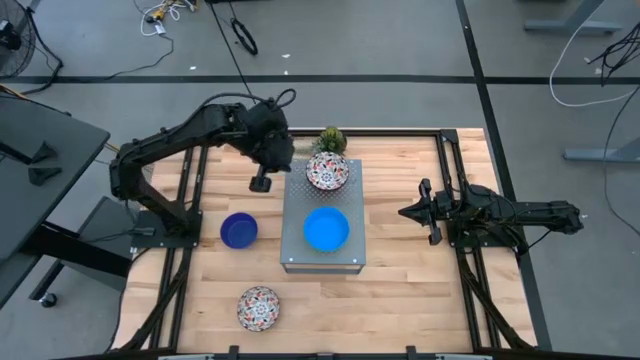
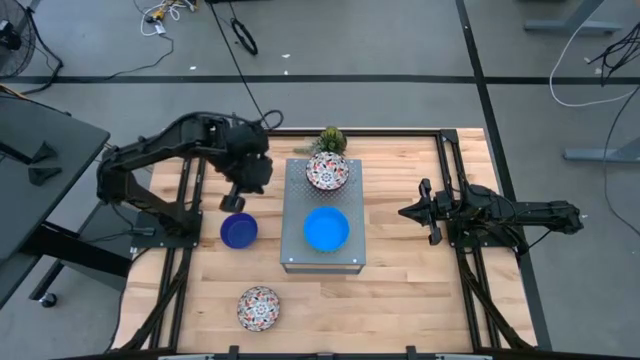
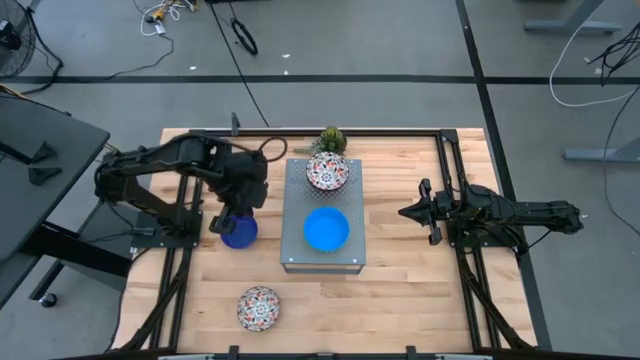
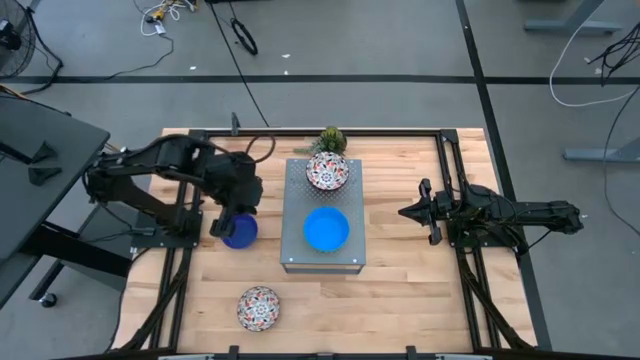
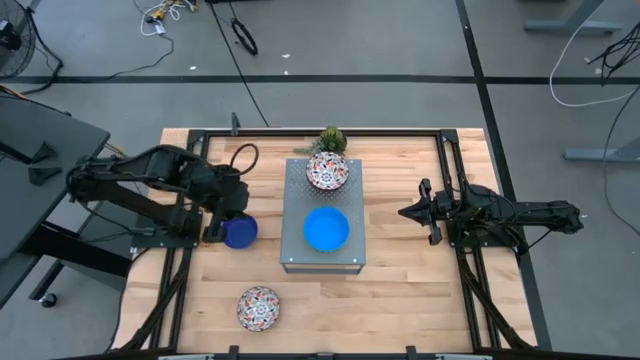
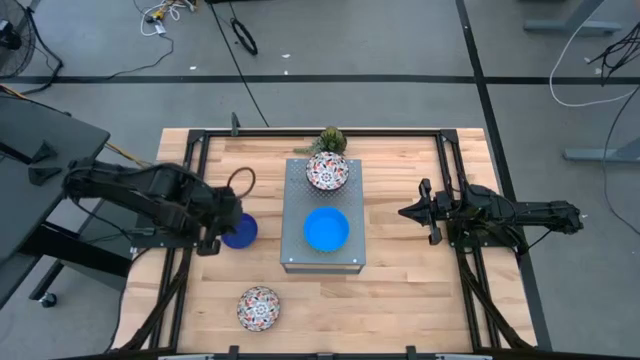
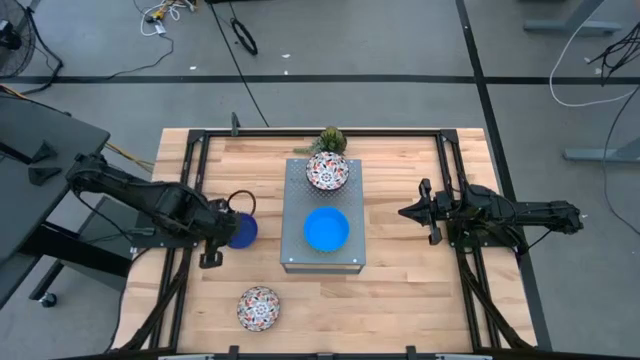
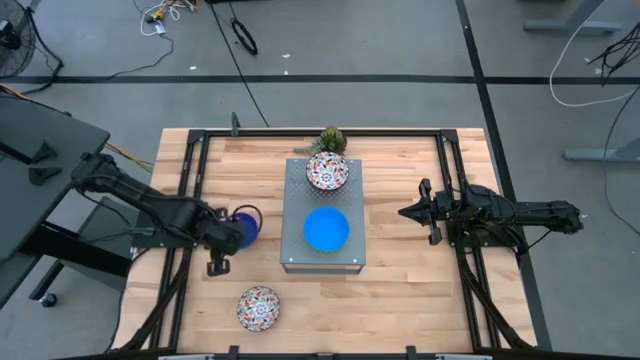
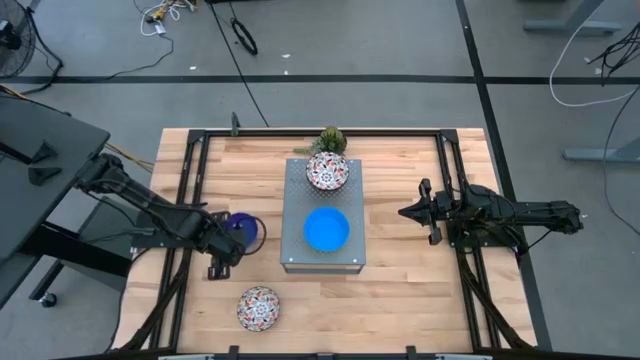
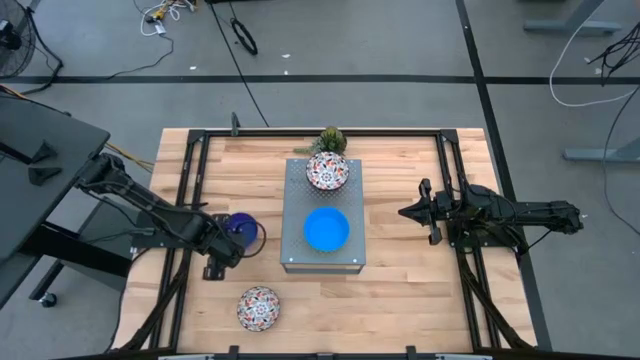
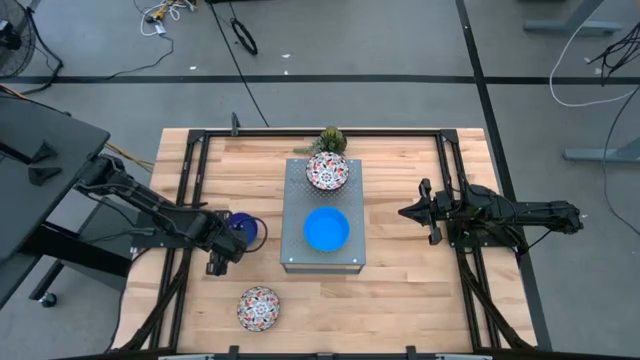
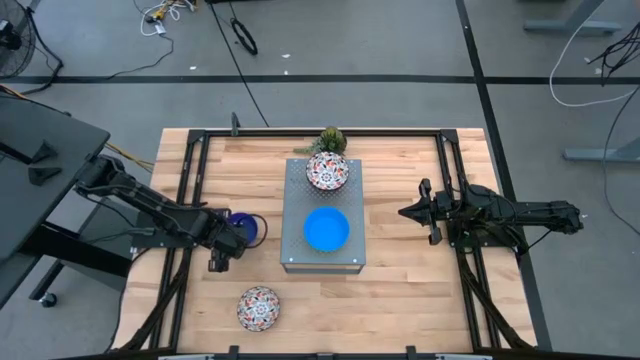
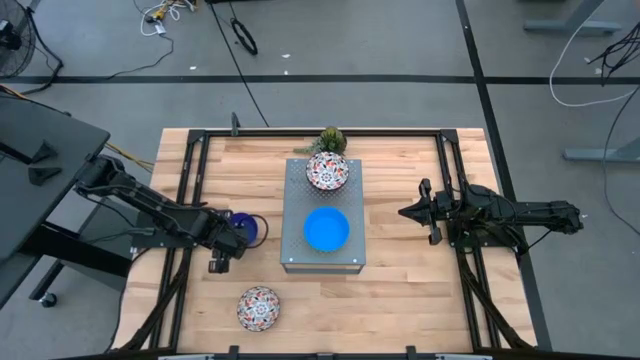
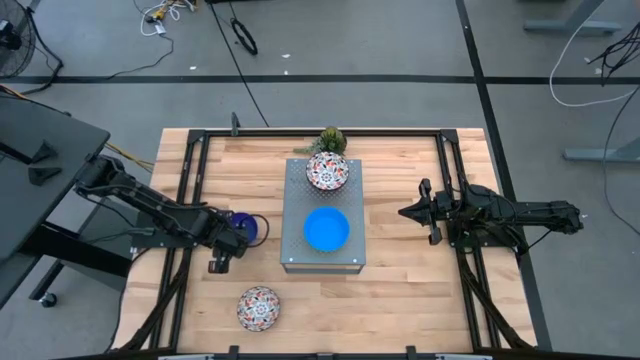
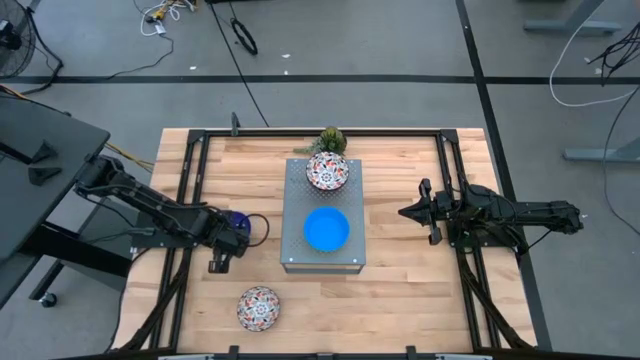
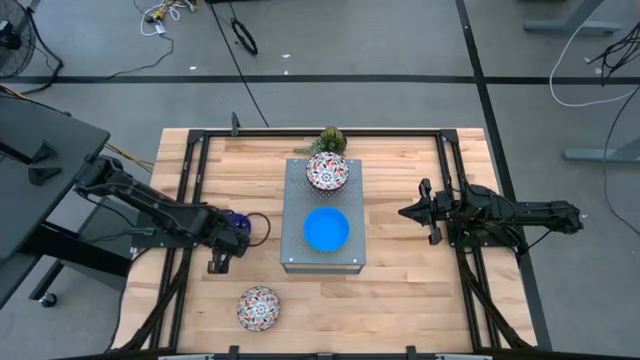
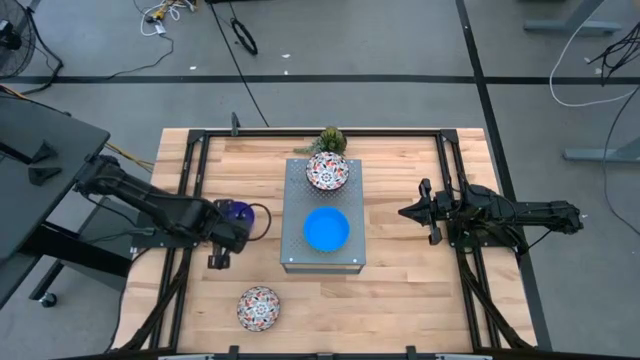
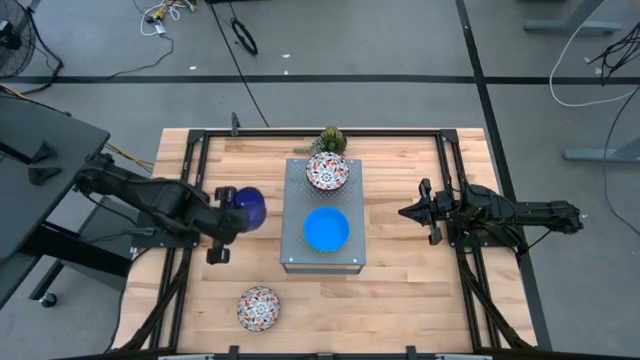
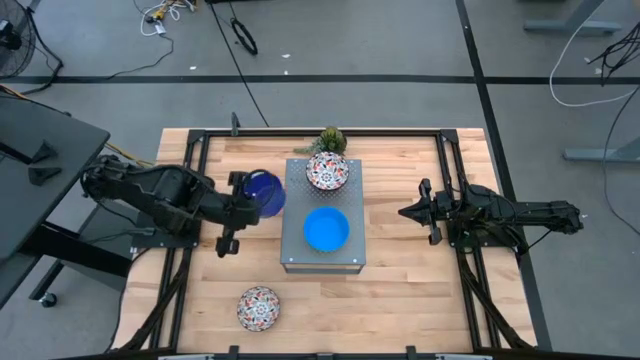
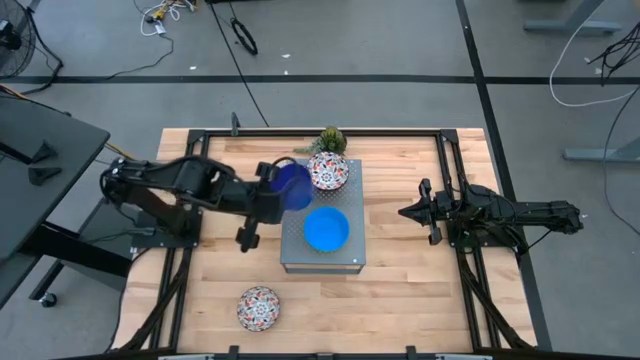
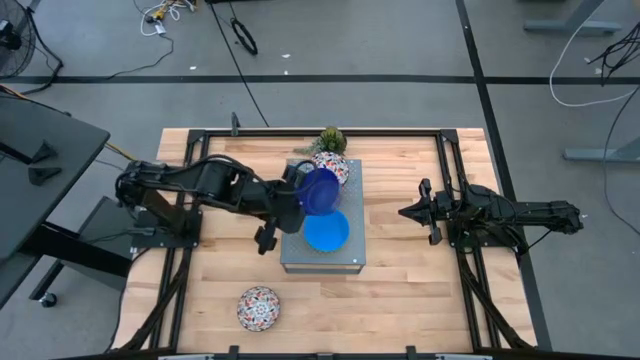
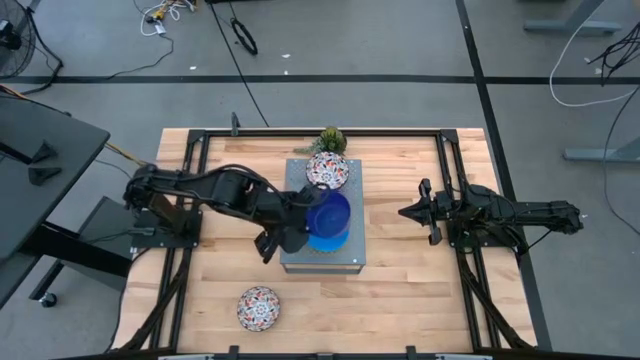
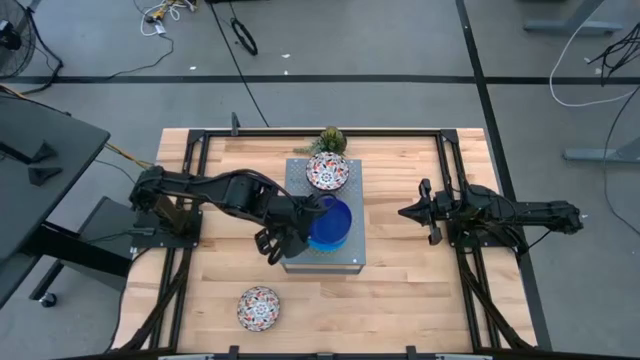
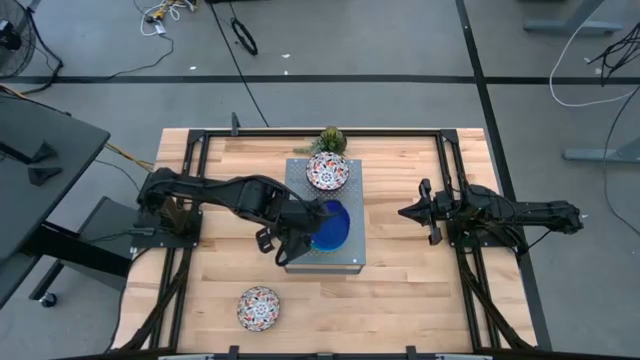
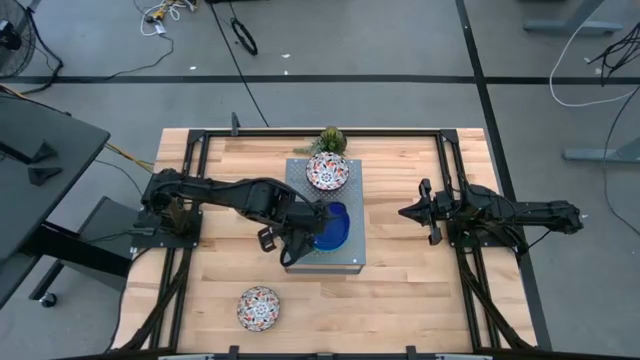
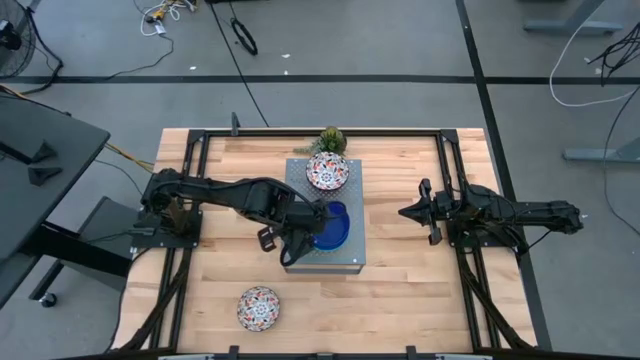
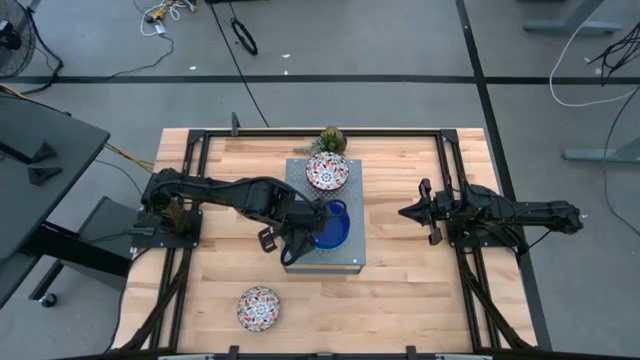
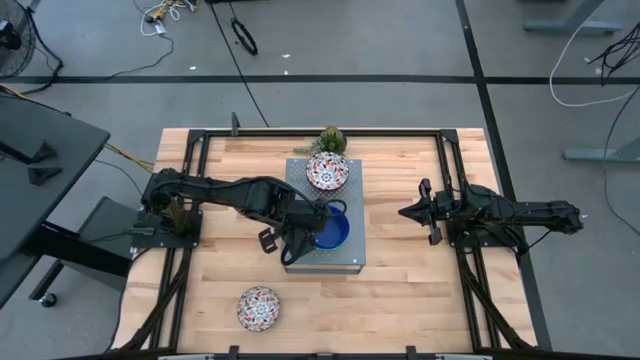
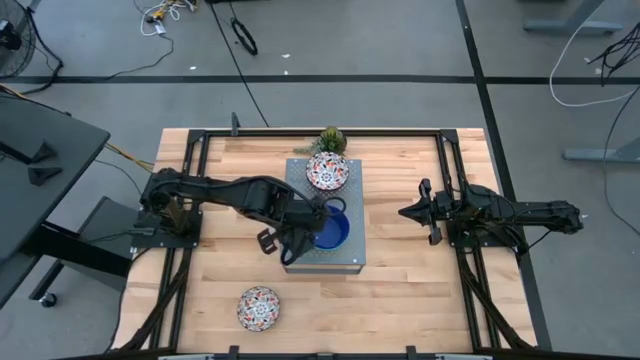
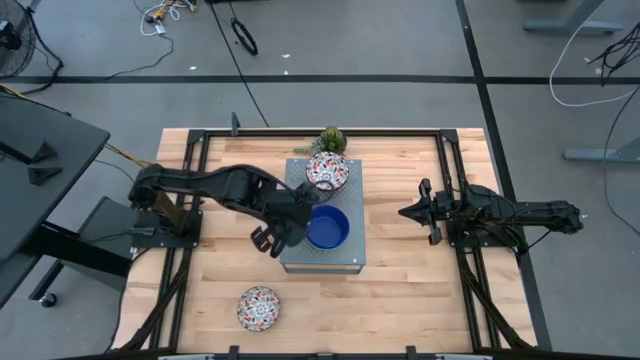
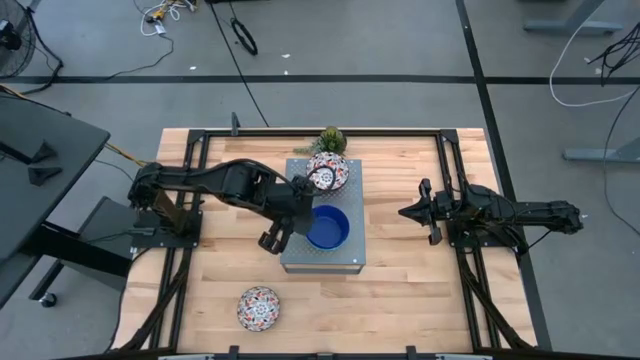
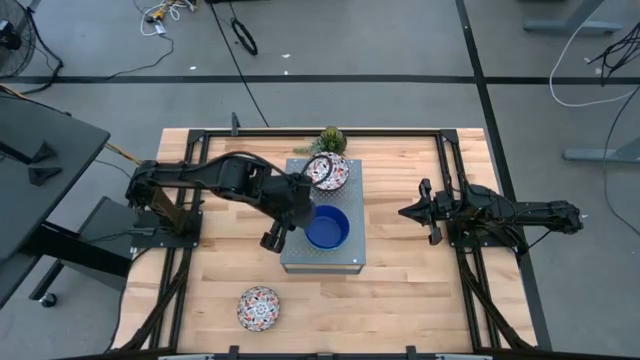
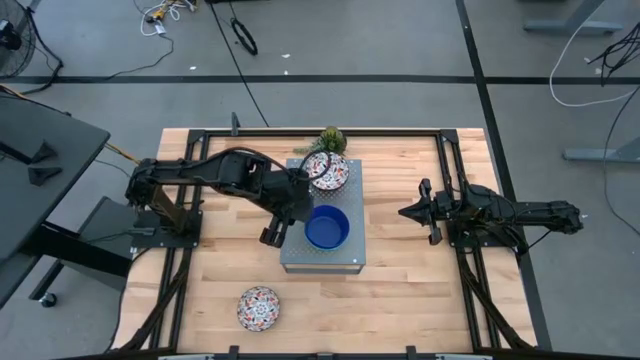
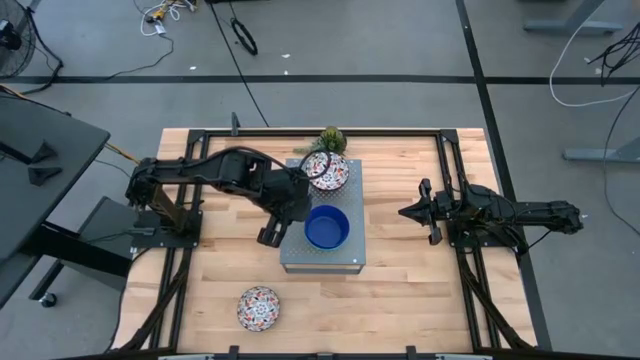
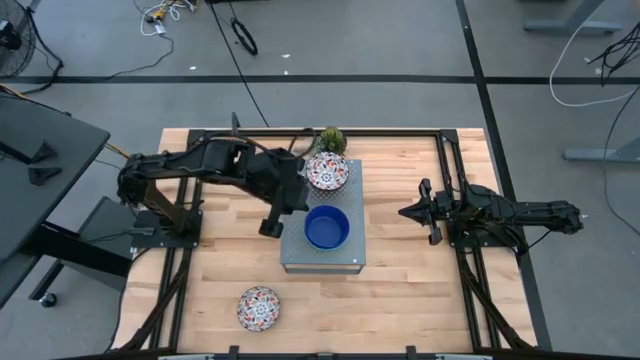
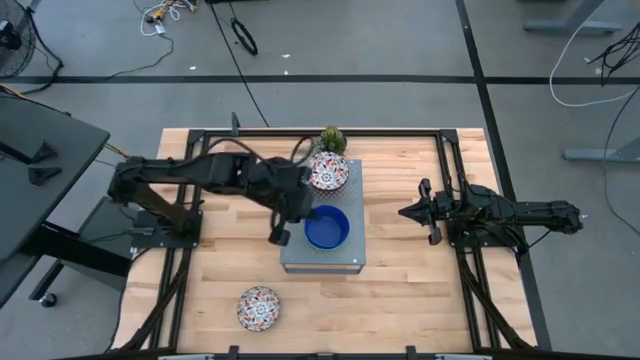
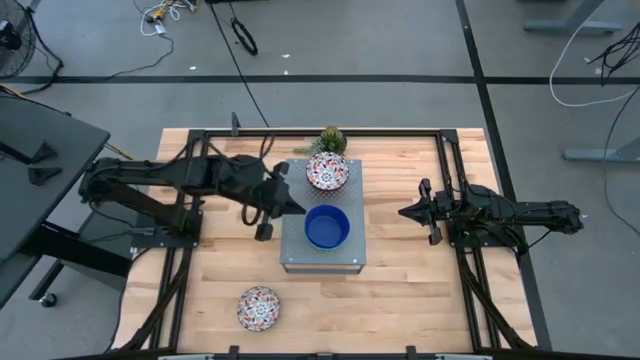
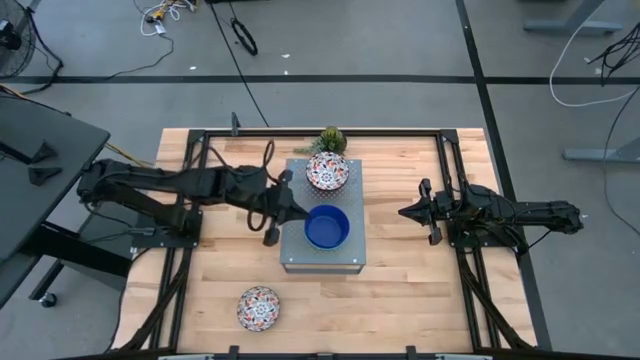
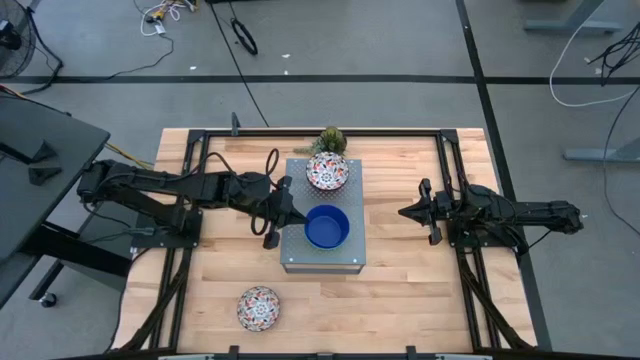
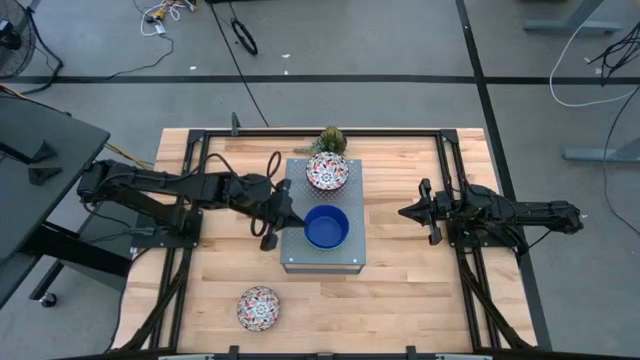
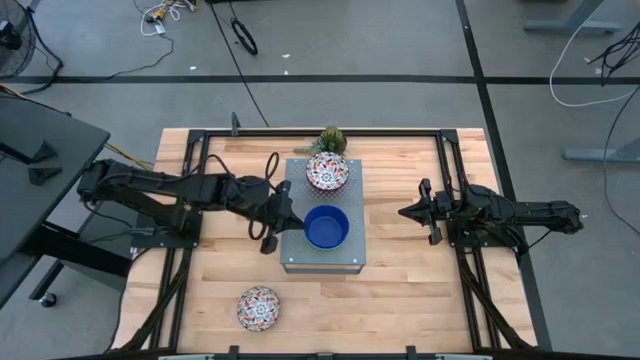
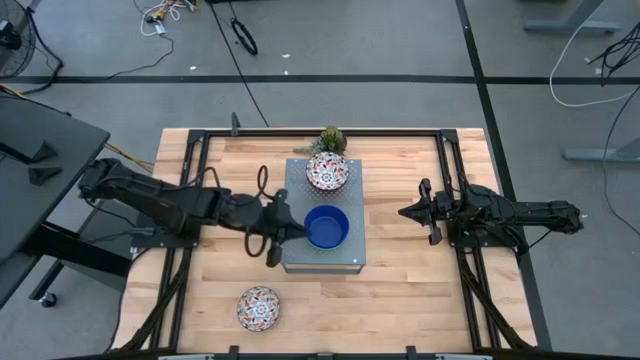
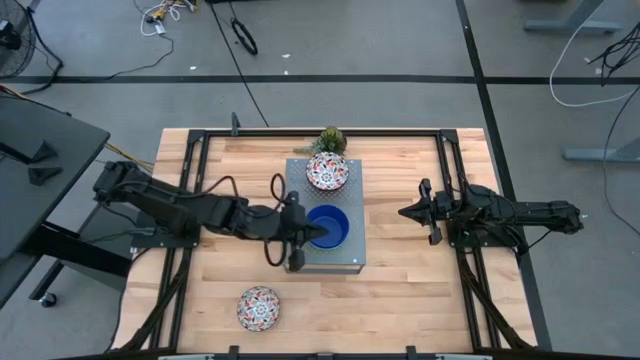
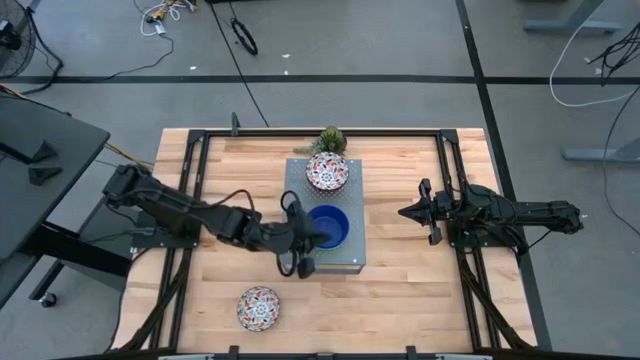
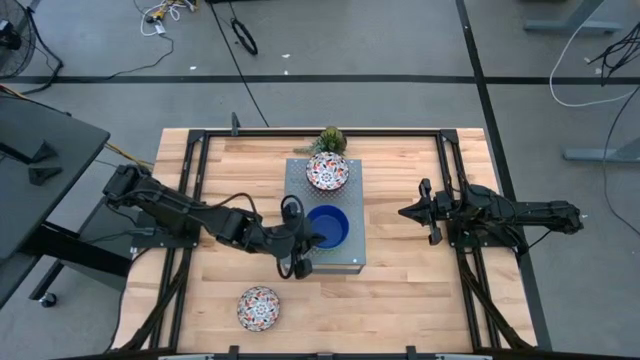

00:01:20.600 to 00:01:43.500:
Task: Pick & Place Mini bowls
Stack the blue bowl on the light blue bowl on the shelf
